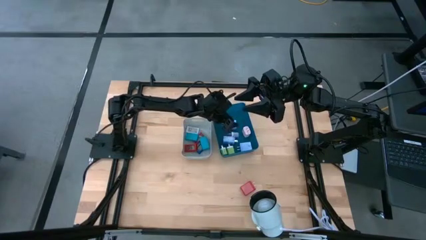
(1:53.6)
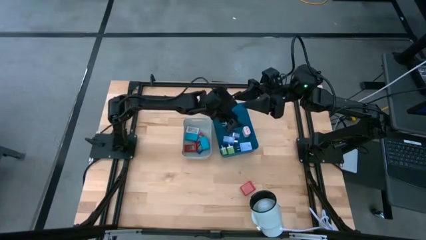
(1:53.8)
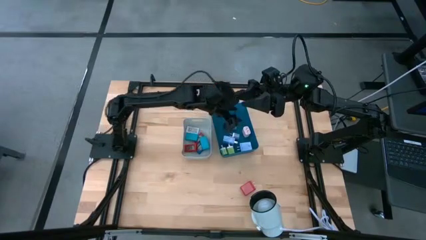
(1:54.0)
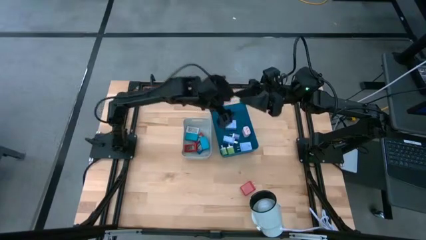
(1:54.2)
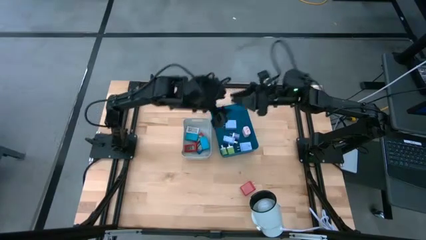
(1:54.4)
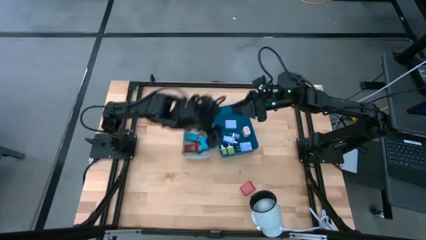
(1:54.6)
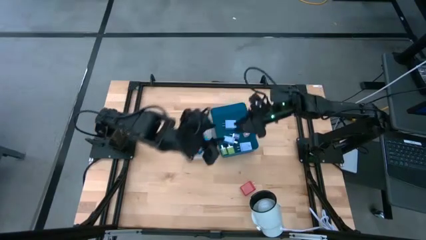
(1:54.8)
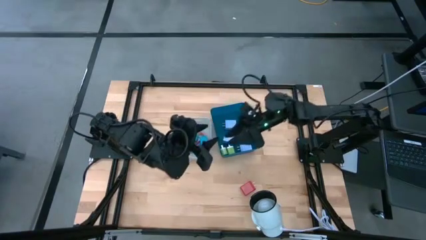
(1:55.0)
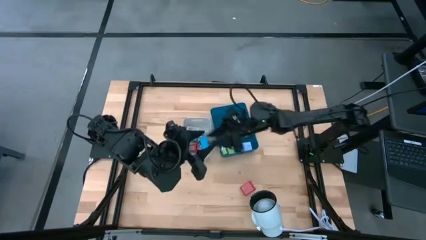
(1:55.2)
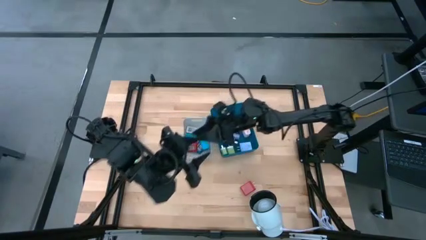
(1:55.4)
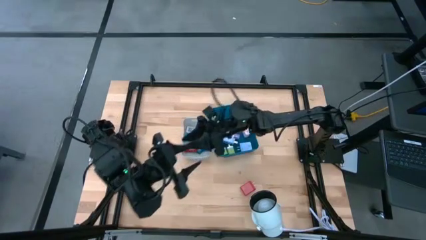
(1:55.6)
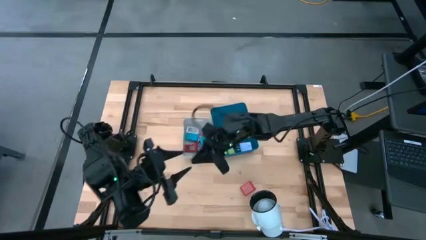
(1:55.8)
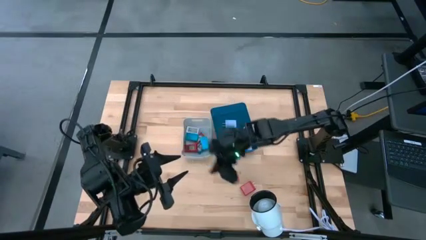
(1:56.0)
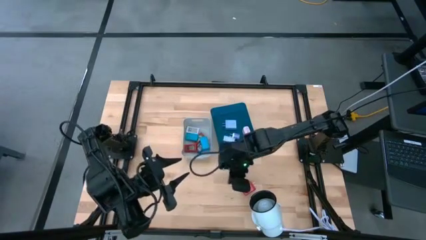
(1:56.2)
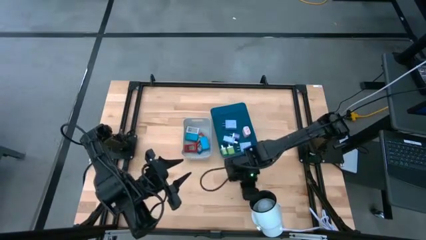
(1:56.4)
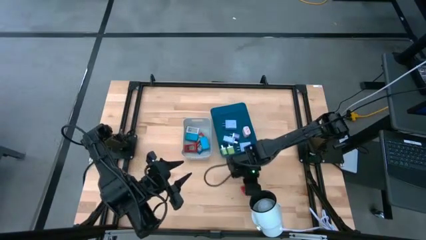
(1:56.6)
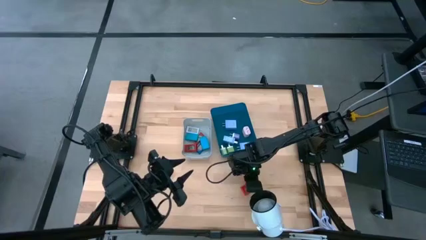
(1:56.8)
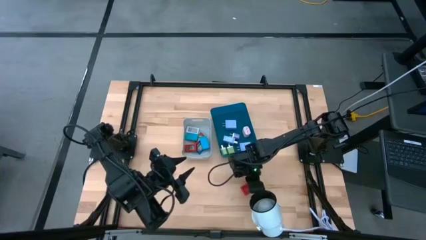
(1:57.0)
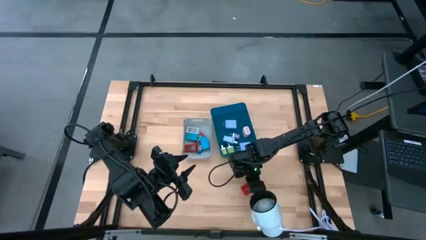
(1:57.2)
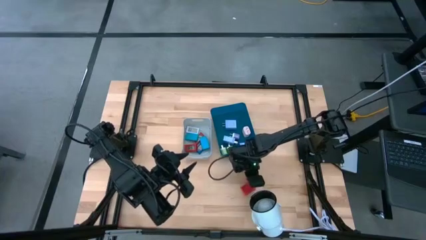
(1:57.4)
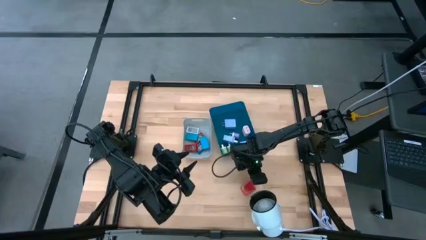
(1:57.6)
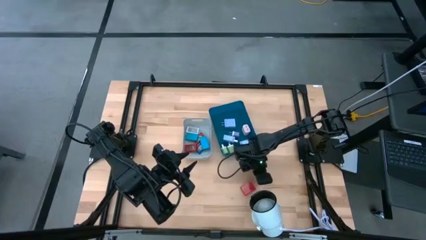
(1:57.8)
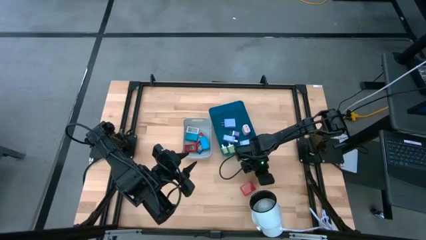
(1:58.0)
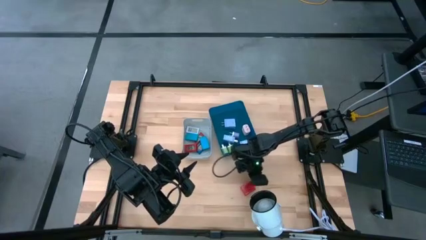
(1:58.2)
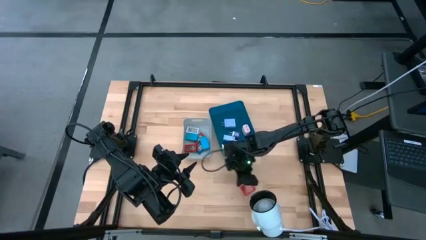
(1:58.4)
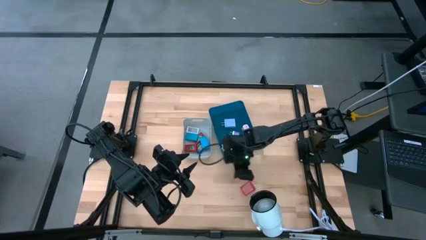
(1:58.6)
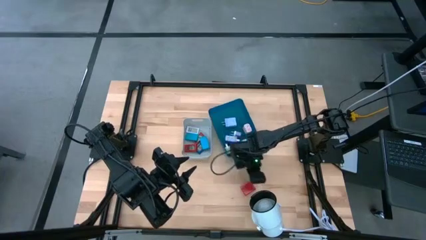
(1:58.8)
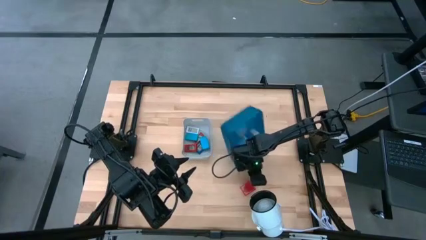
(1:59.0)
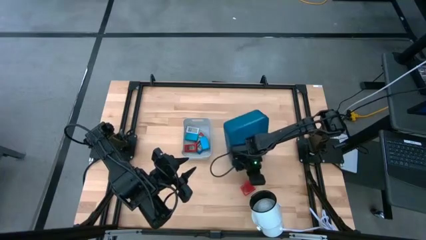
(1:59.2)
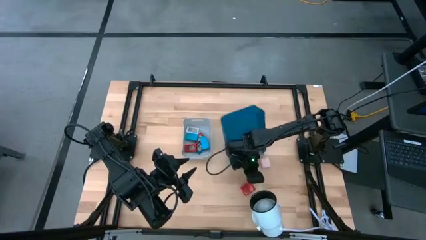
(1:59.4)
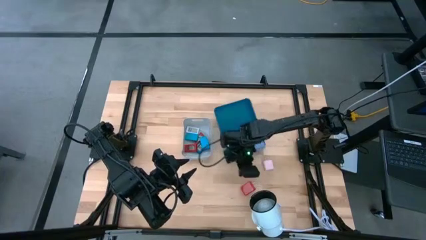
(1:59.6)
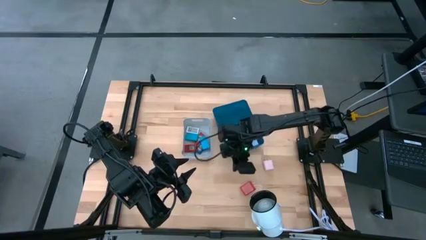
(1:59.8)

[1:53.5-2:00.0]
Task: Pick & Place Office items
Put the red charger adapter into the blue bin

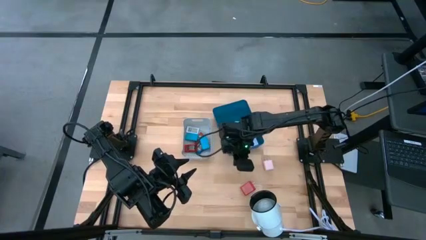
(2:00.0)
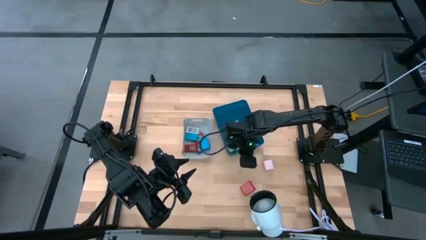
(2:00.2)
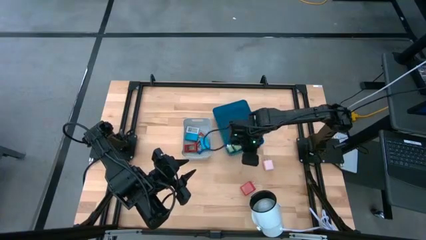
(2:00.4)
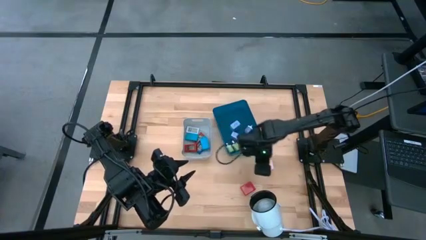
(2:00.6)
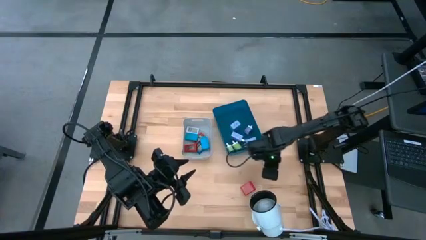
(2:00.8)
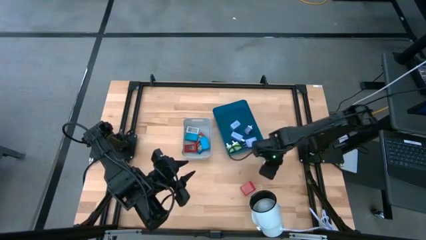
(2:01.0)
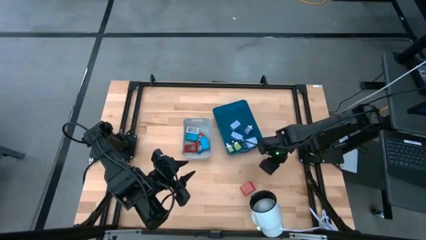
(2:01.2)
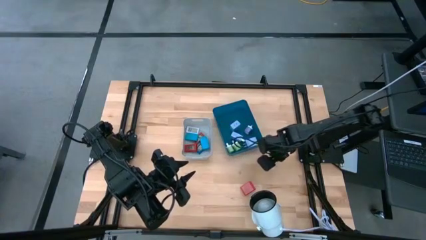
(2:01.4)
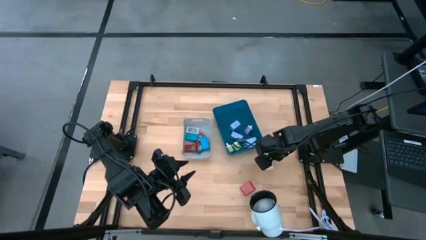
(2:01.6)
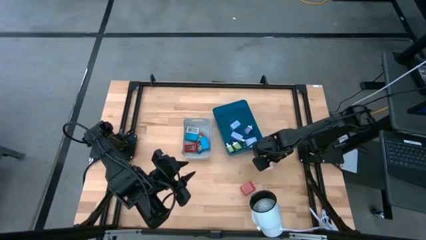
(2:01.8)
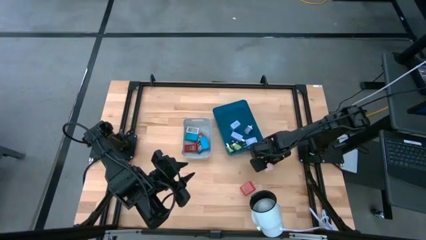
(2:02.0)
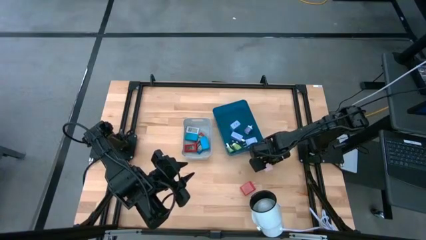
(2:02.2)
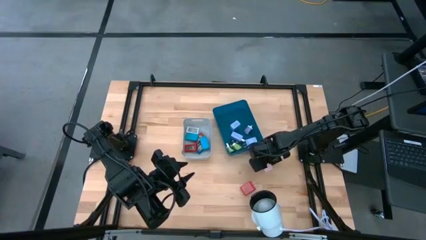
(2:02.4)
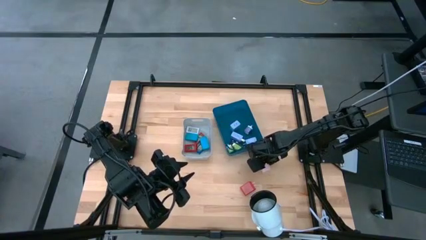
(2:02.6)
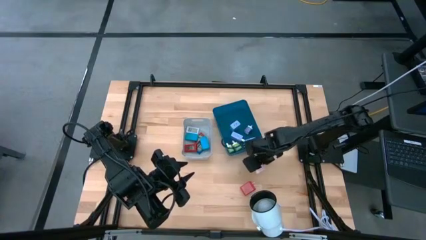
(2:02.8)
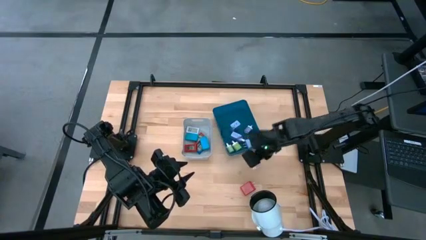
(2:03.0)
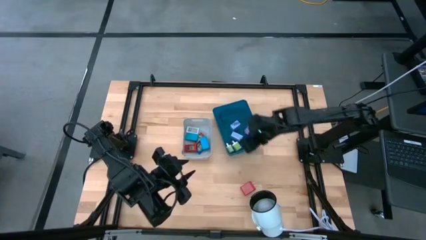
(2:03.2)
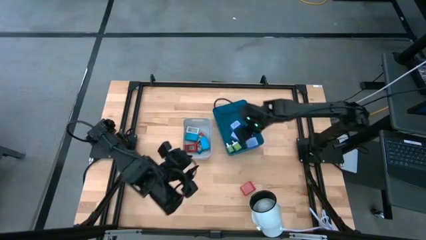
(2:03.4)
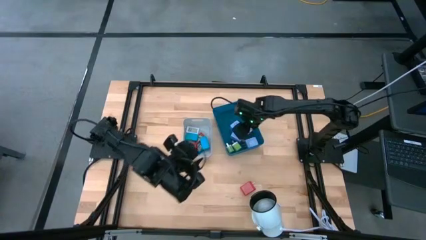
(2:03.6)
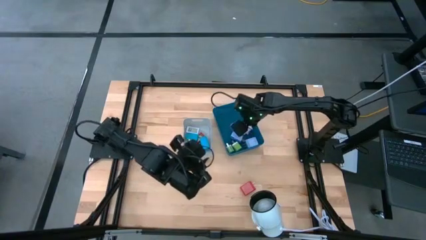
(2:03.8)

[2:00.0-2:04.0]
Put the pink charger adapter into the blue bin

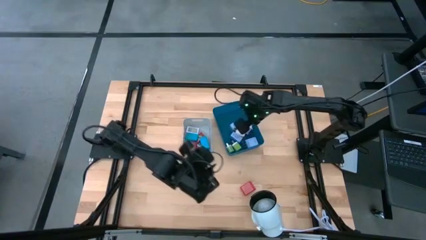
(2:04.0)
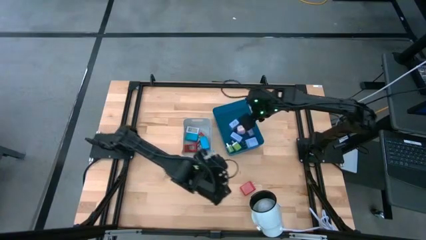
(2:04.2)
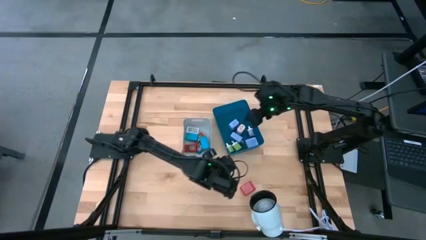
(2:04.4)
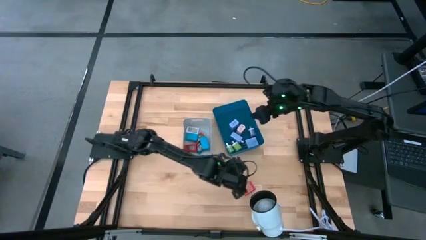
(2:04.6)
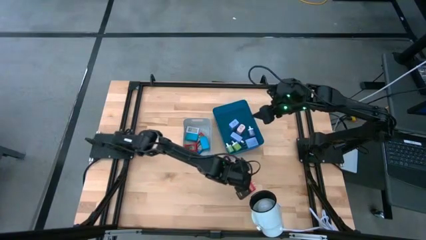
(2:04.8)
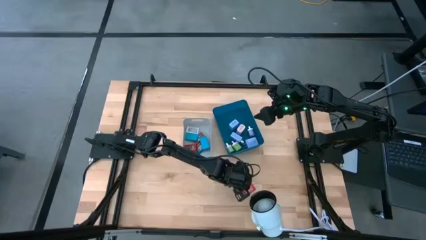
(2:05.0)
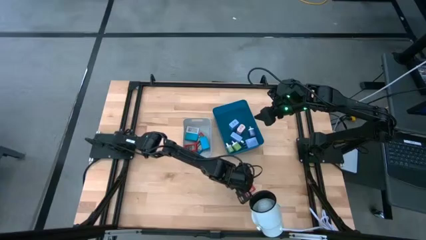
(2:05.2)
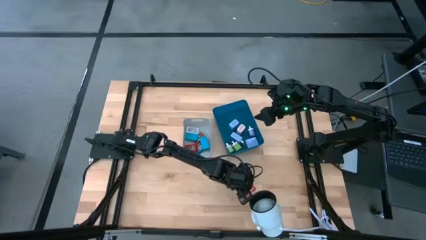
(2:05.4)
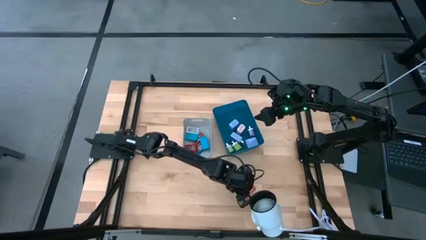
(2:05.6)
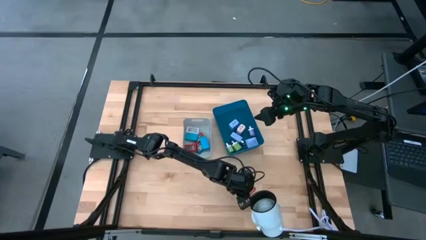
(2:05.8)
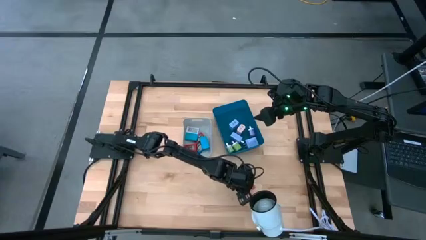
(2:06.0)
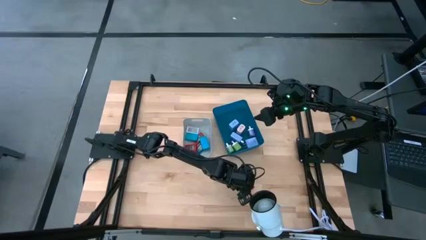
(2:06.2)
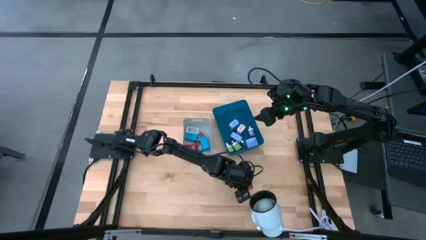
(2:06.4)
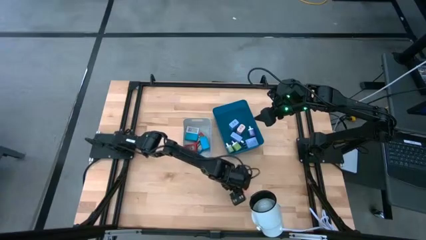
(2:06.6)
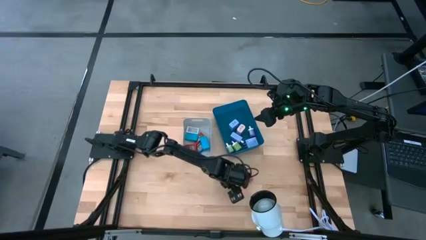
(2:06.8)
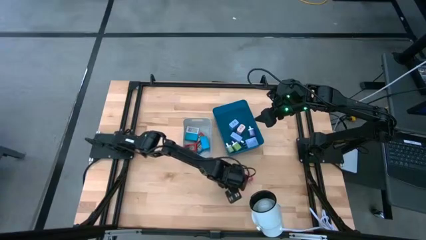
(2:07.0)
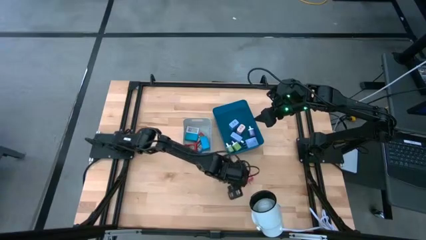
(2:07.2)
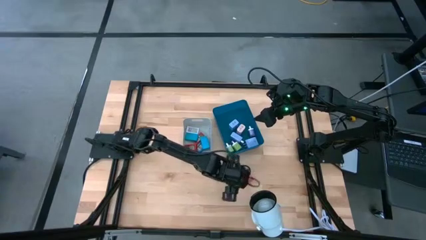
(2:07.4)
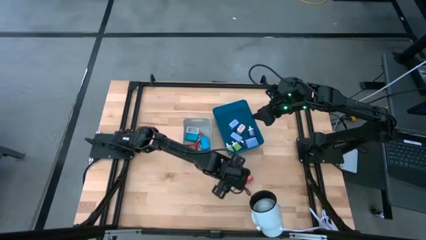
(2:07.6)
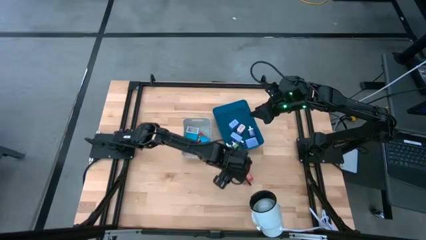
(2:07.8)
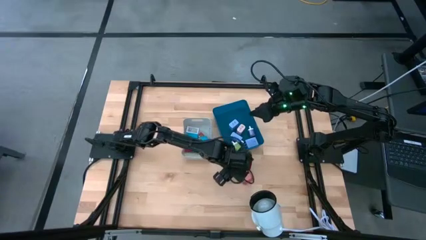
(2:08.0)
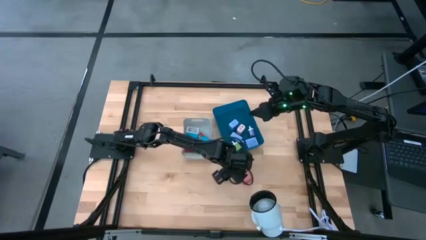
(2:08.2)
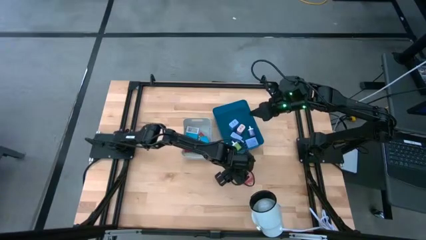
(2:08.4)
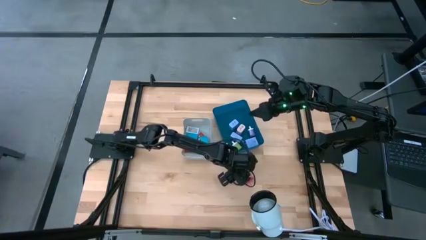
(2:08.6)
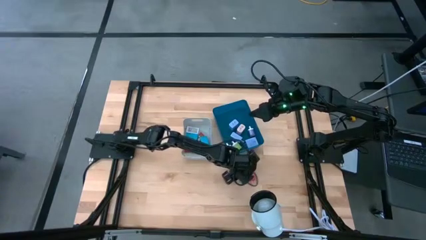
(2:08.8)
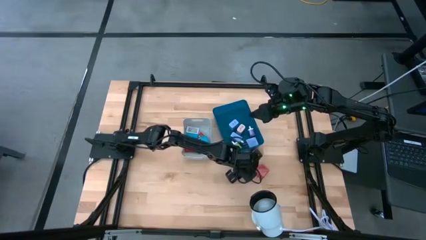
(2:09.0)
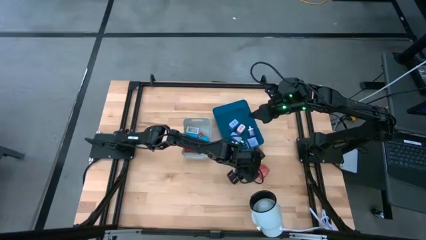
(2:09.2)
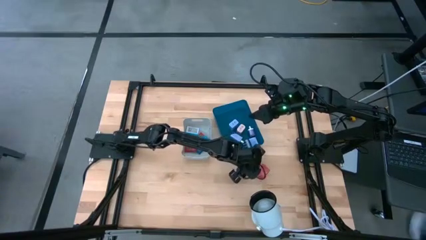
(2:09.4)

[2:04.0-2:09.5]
Put the red charger adapter into the blue bin

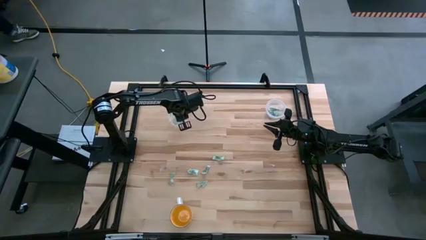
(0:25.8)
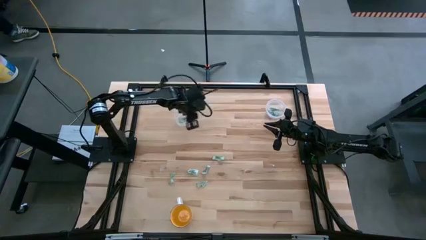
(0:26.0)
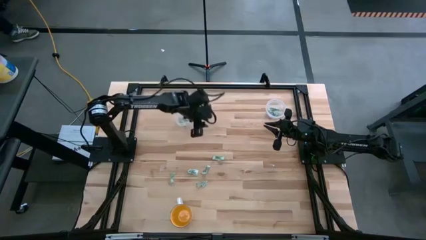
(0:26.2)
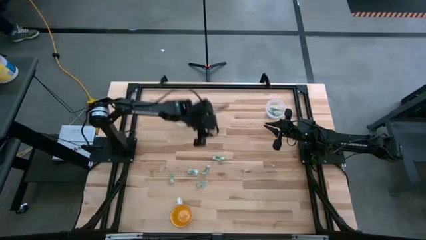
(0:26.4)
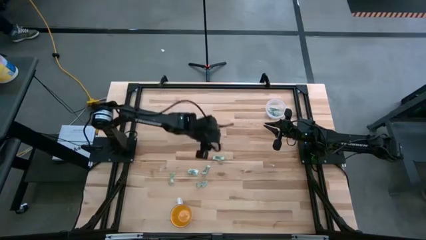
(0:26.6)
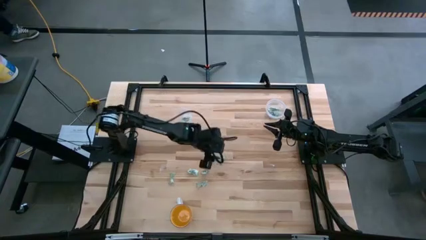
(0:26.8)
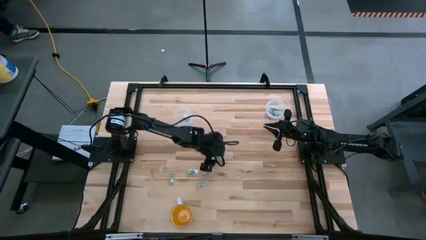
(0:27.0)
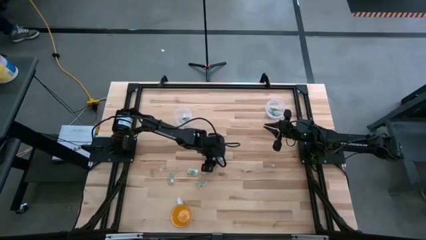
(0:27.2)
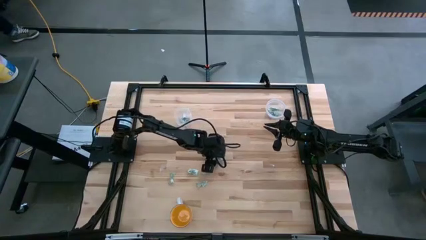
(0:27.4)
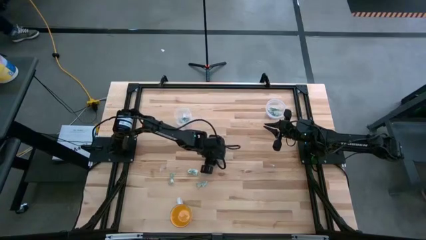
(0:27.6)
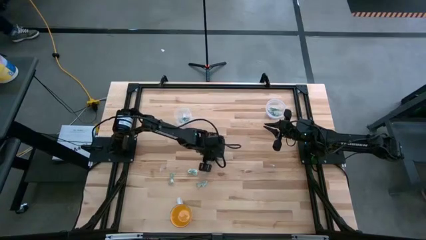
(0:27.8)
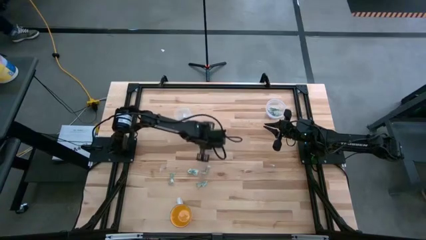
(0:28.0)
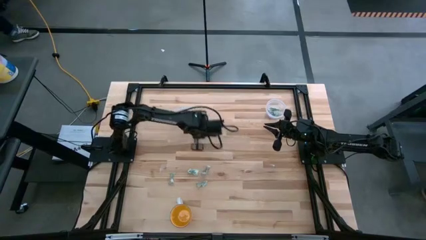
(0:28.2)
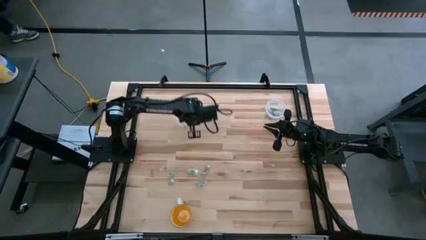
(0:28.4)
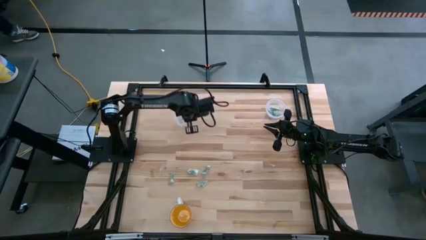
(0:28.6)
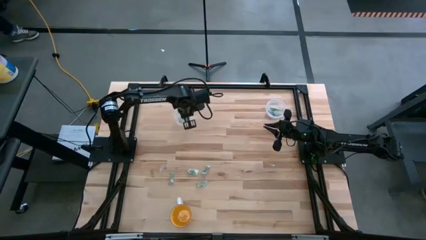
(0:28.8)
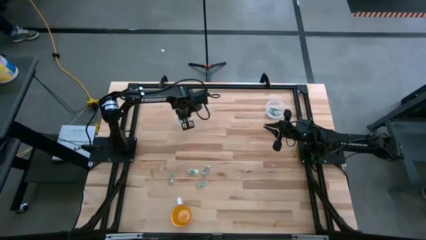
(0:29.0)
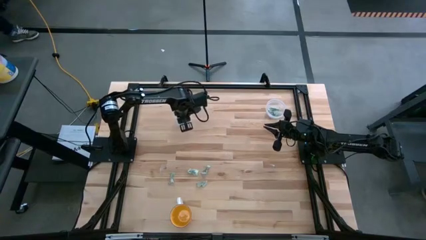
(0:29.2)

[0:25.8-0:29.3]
Task: Pick and place items into bin
Put the stevia packet into the left transparent bin
